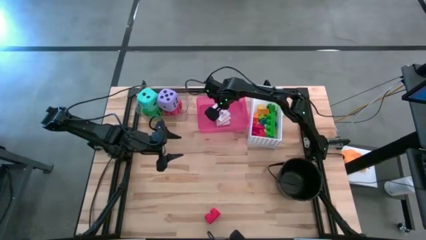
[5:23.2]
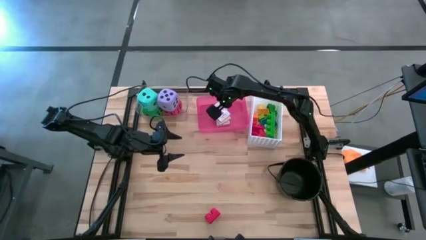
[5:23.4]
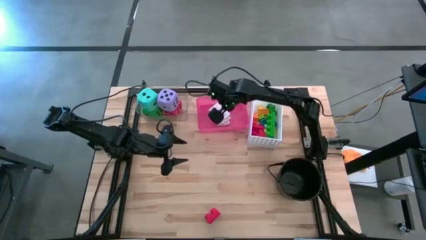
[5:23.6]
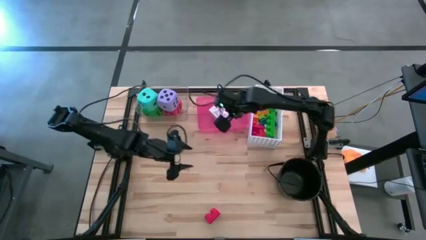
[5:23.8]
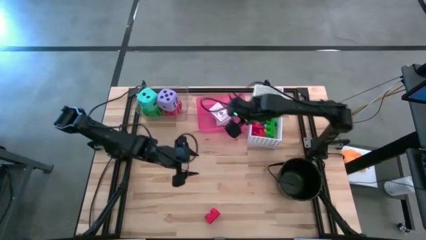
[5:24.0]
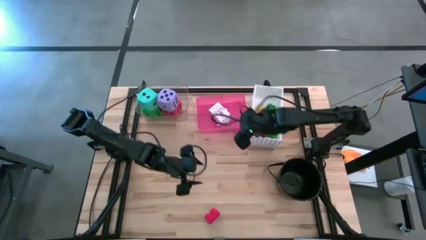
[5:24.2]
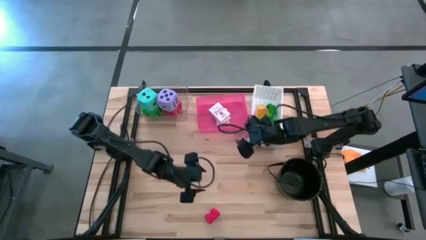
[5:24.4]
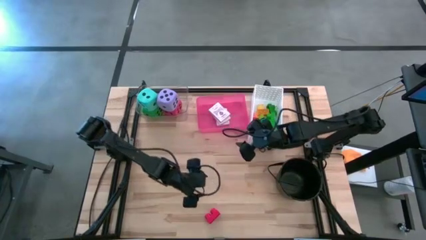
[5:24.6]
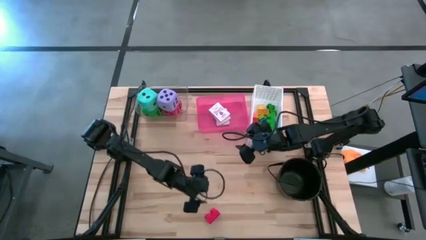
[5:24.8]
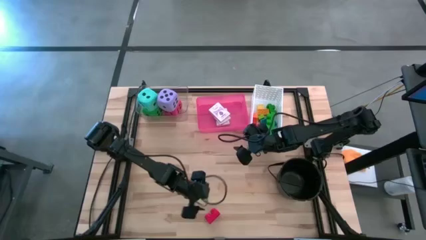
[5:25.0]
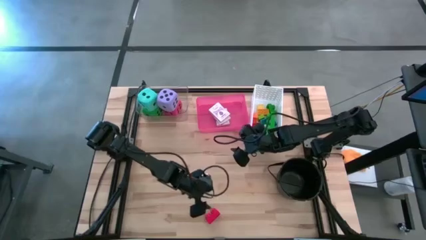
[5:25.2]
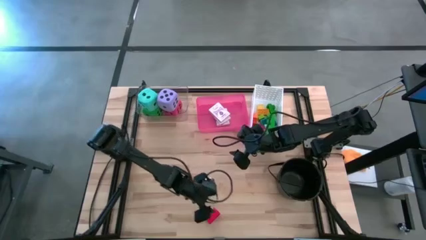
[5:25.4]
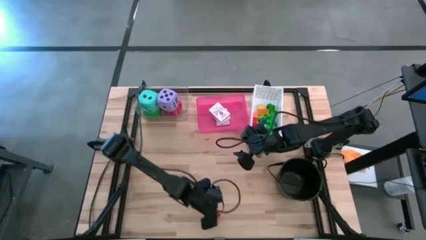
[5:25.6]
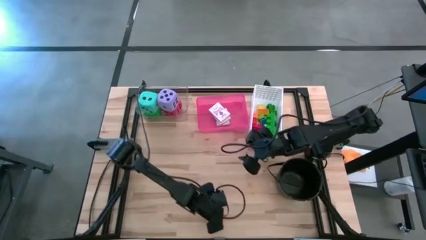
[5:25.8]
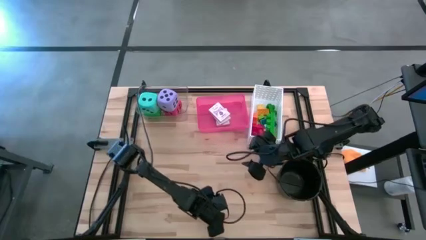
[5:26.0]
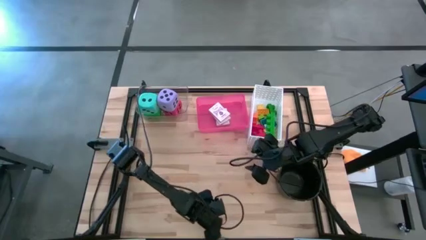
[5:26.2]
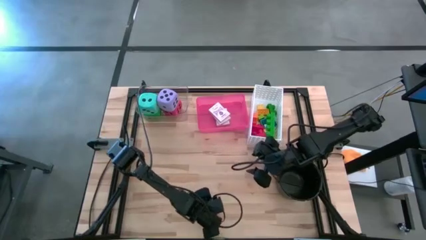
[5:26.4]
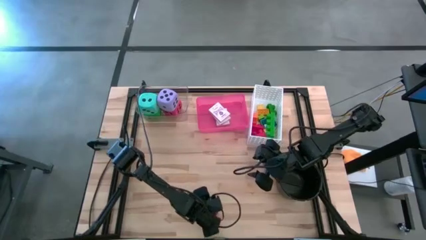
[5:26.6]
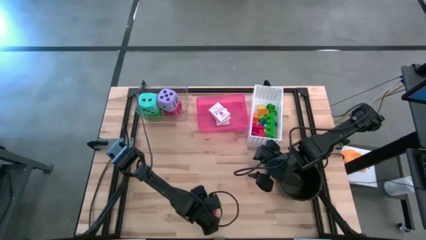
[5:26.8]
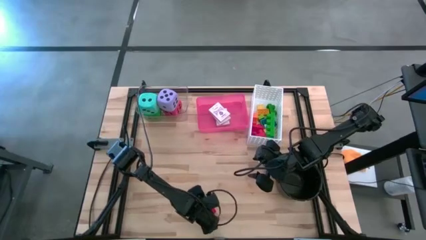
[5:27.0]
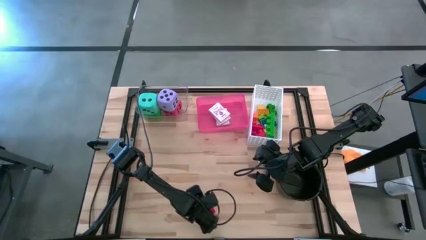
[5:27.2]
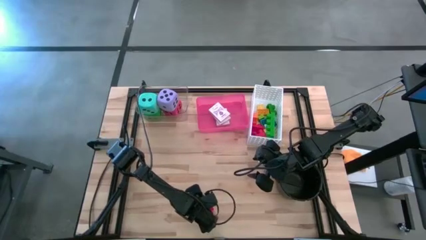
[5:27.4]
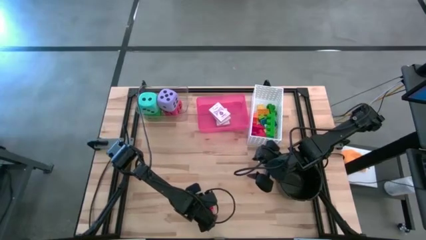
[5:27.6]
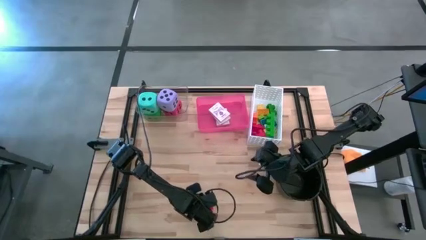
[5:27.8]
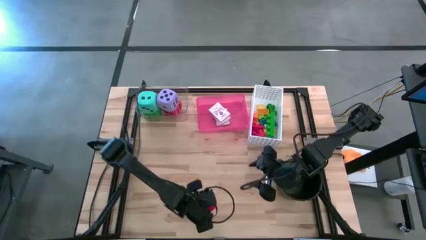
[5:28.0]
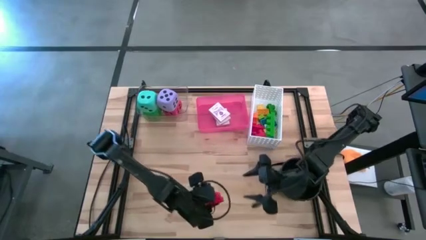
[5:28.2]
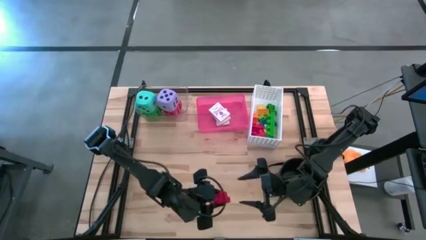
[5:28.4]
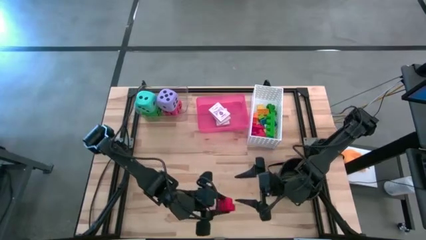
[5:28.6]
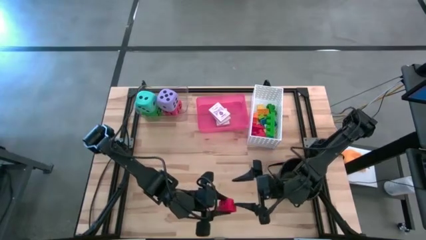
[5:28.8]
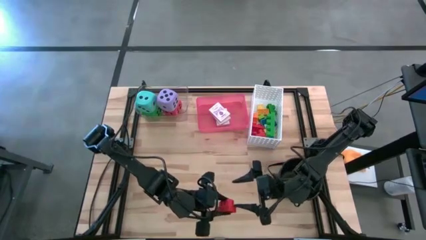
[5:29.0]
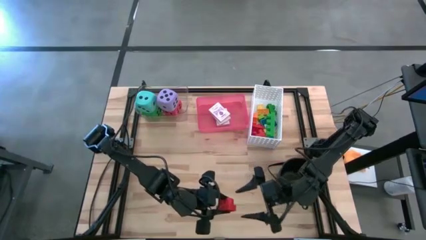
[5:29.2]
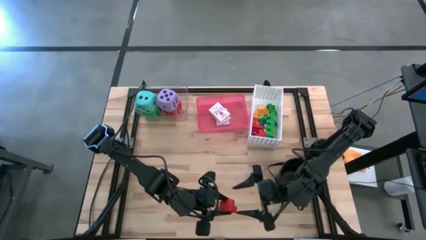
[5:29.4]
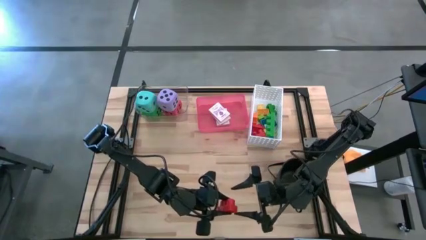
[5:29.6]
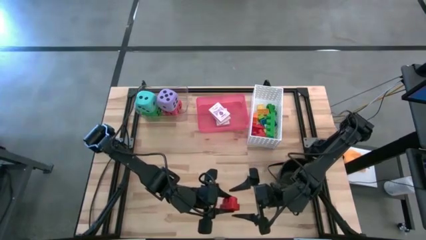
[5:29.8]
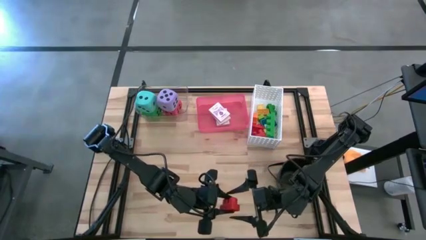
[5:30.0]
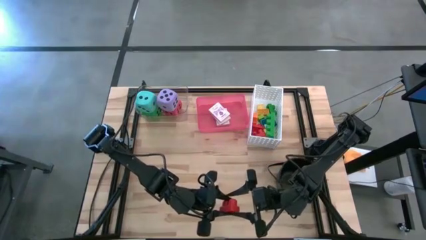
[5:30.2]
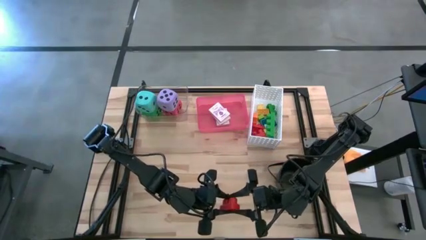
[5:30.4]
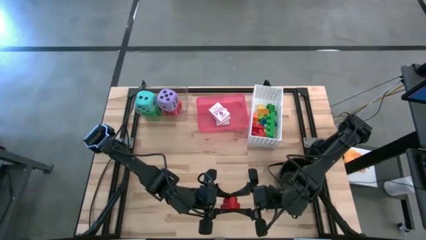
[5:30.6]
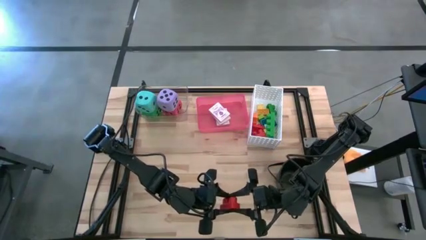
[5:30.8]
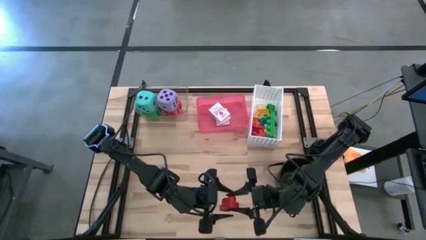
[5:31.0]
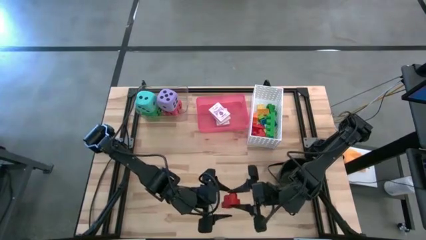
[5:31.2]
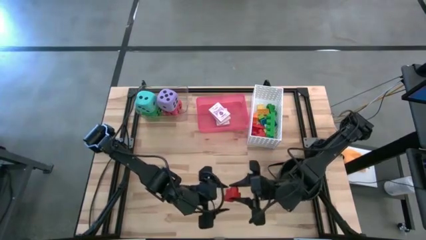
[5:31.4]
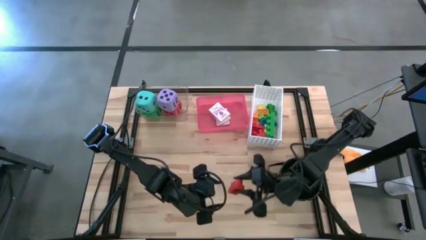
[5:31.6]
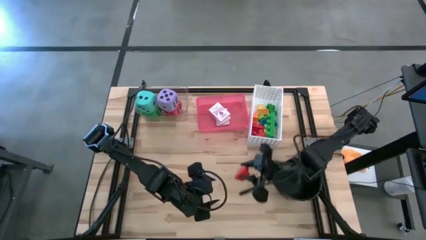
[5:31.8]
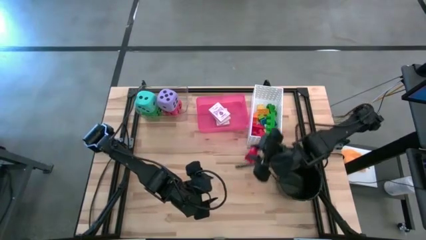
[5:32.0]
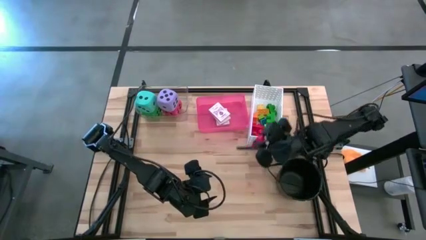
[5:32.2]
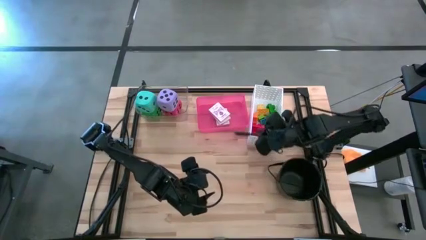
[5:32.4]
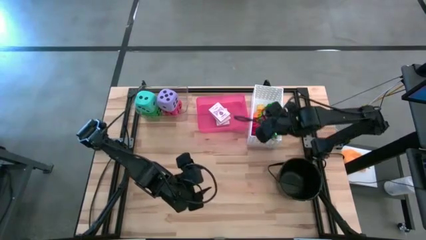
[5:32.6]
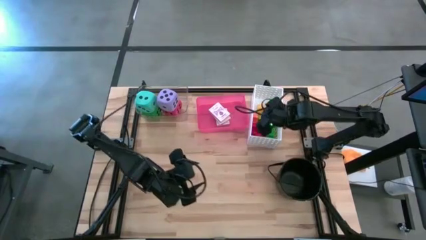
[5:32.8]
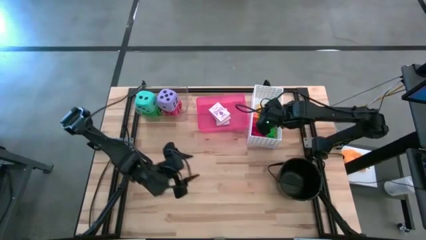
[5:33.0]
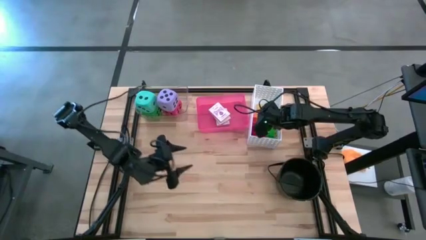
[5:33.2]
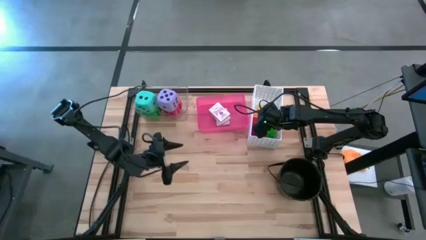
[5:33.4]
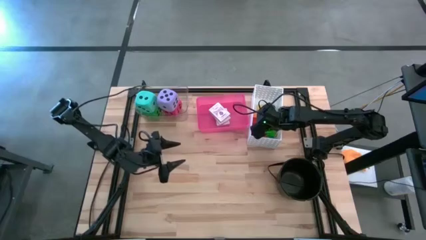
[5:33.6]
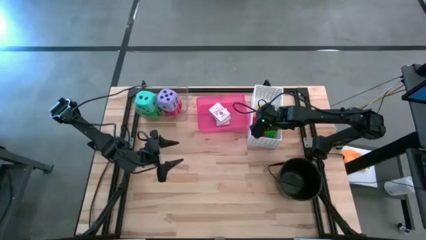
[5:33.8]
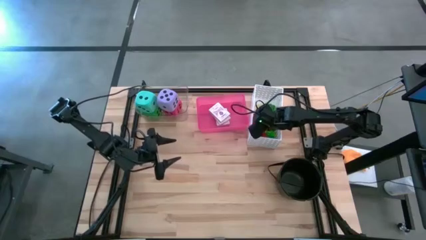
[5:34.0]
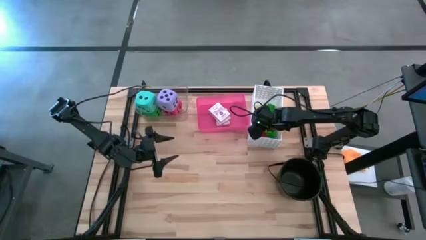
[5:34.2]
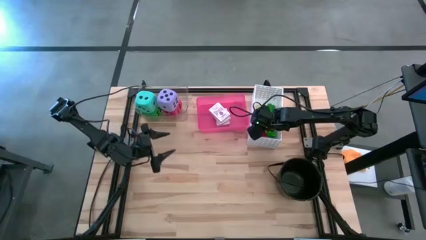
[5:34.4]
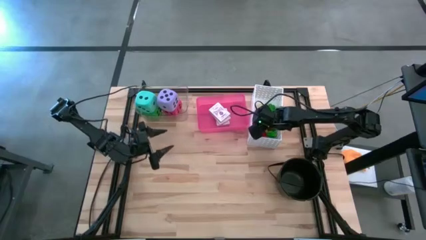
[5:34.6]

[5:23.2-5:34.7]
Task: Pick & Place Toys
Put the large red game piece into the white bin

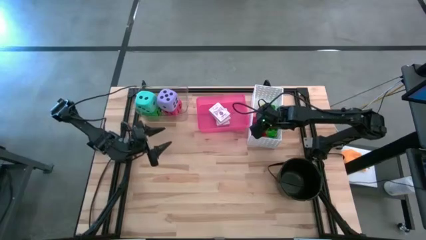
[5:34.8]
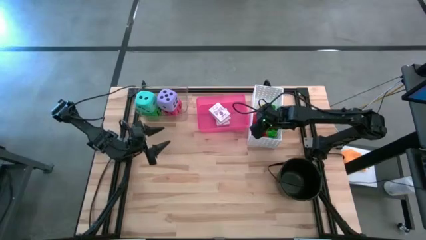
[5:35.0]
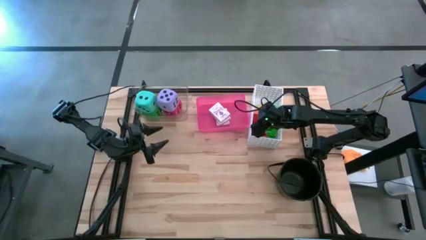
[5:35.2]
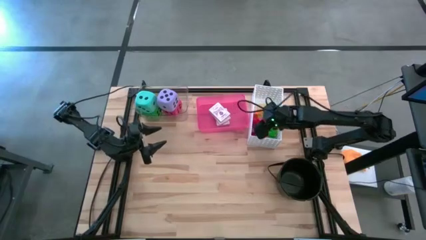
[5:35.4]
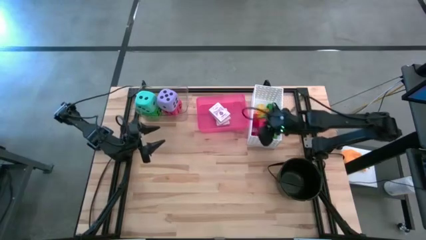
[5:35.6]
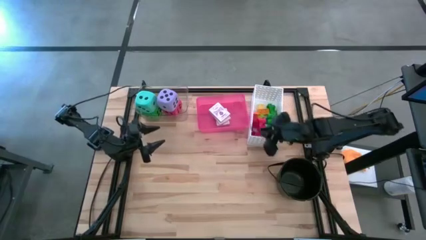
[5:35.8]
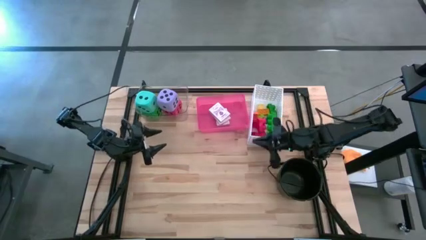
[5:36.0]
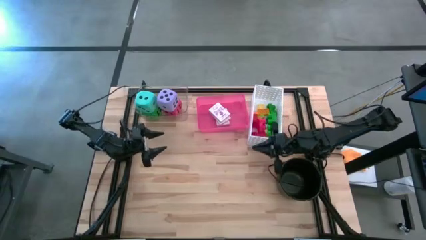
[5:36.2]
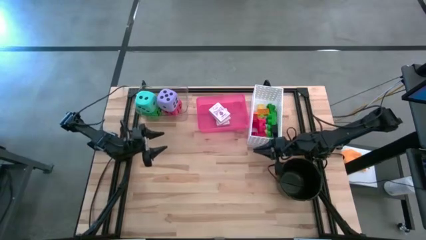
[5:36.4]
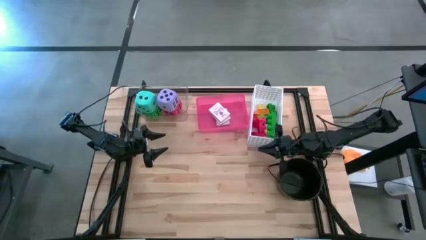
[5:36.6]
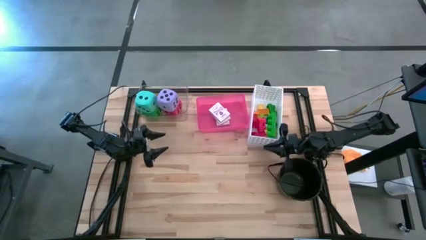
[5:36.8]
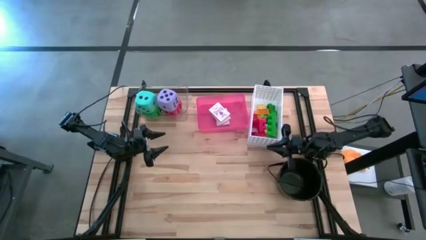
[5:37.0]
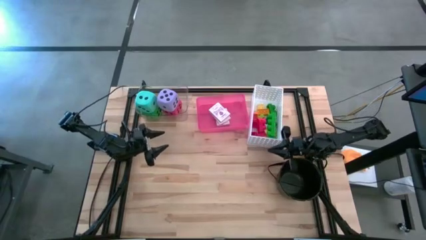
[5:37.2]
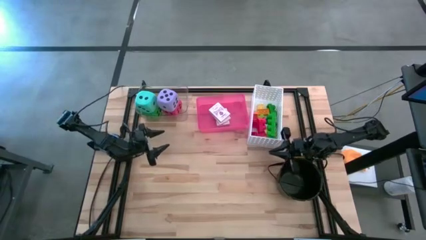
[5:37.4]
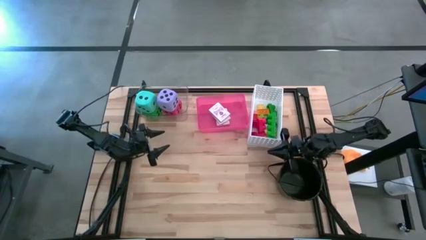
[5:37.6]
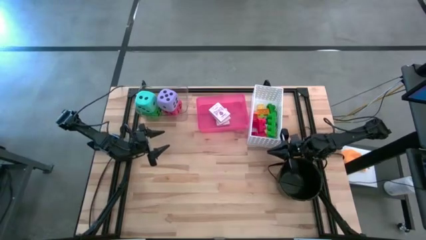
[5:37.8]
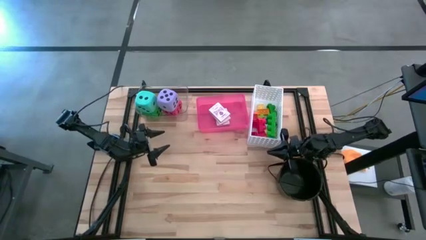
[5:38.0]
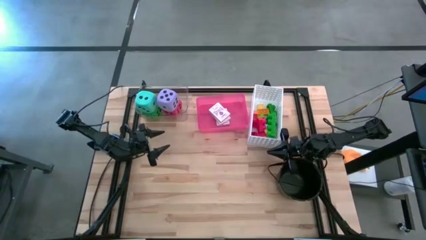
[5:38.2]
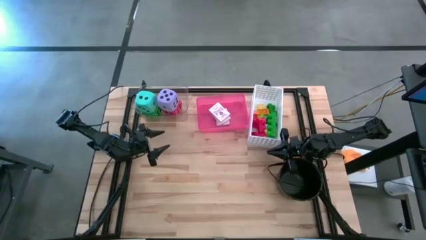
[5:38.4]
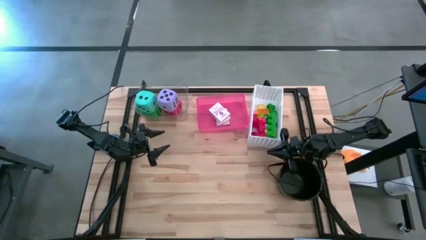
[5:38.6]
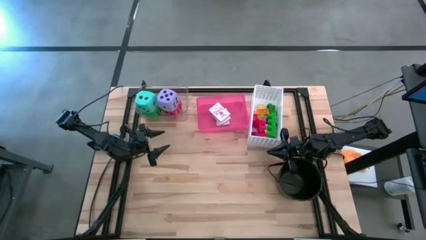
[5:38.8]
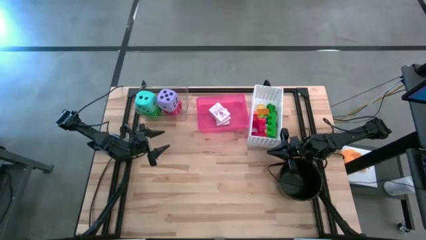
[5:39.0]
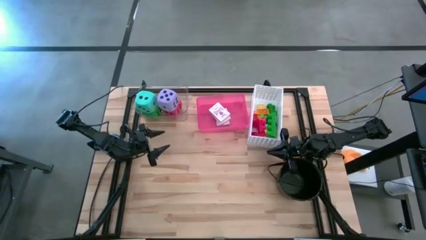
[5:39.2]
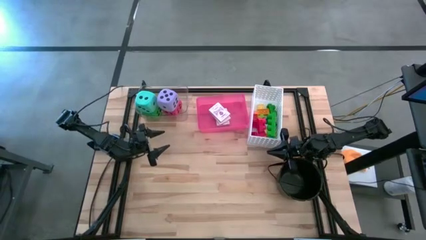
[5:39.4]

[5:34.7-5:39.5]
Return to Home Position

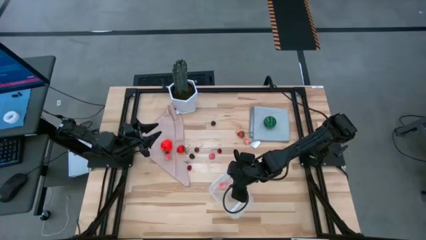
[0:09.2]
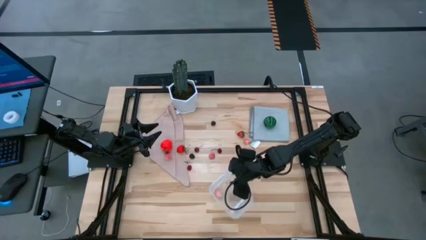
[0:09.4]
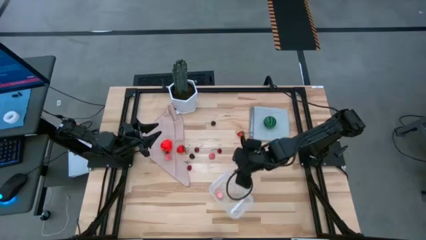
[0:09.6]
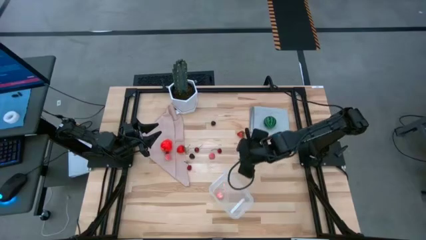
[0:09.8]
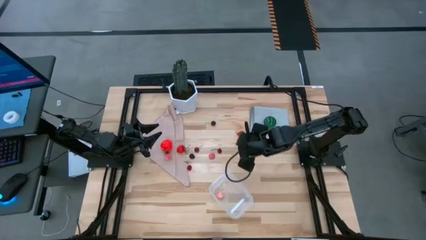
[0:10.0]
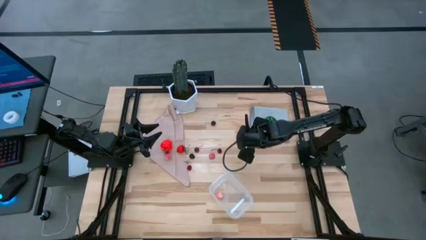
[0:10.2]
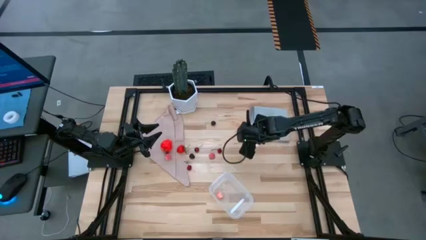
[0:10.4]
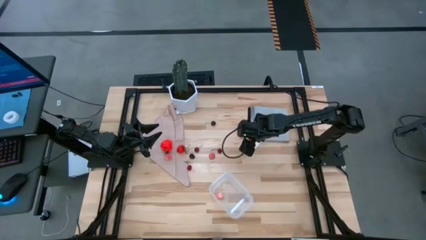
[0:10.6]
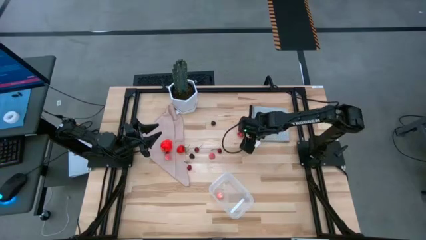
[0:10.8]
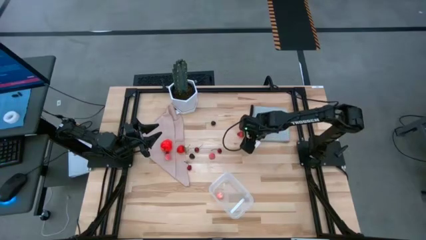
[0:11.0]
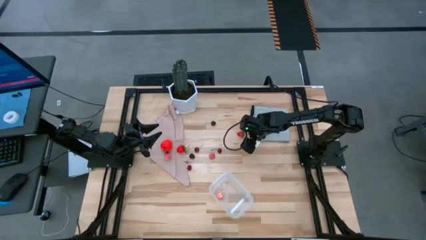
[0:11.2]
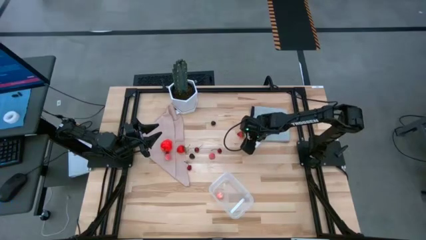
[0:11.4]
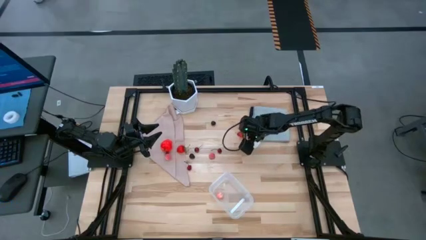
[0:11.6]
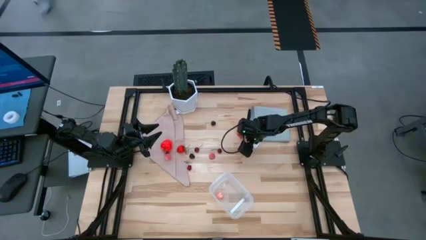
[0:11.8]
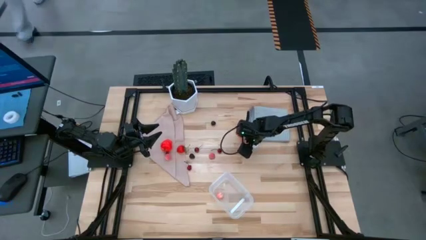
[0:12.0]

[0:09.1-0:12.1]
Task: Pick and placing Produce into tupperware
Put the top right peach into the transparent bin
